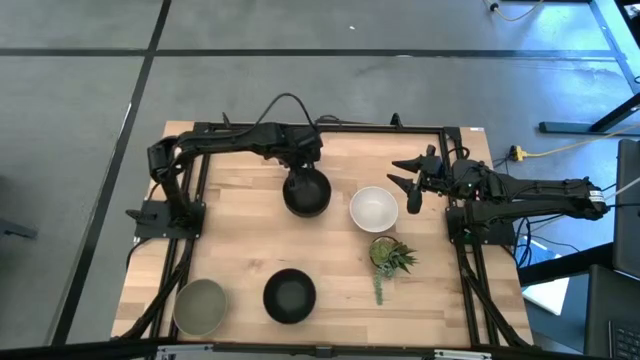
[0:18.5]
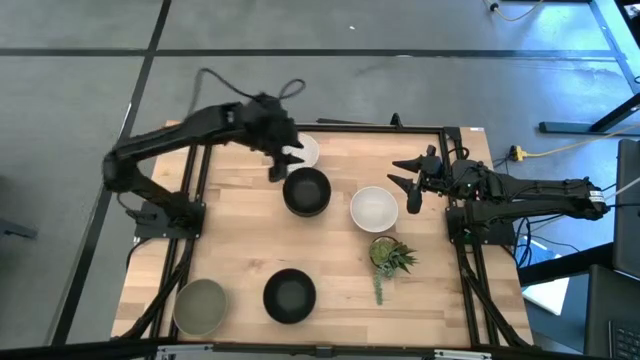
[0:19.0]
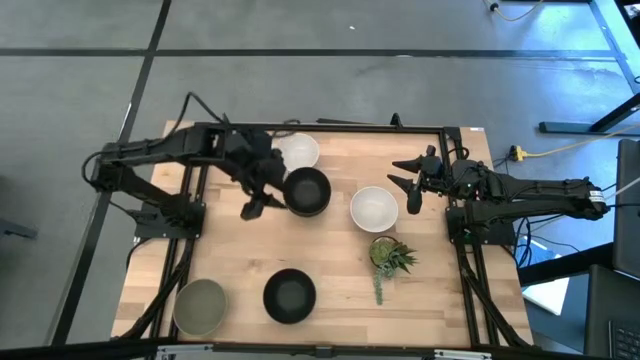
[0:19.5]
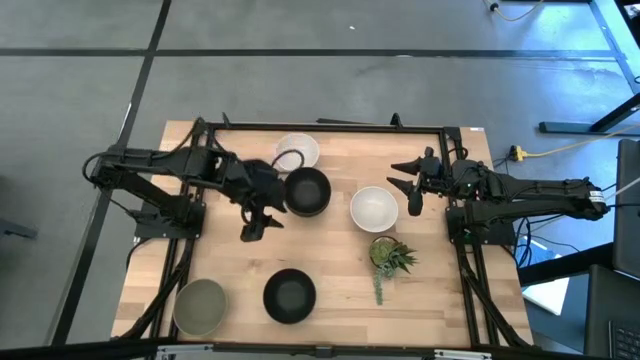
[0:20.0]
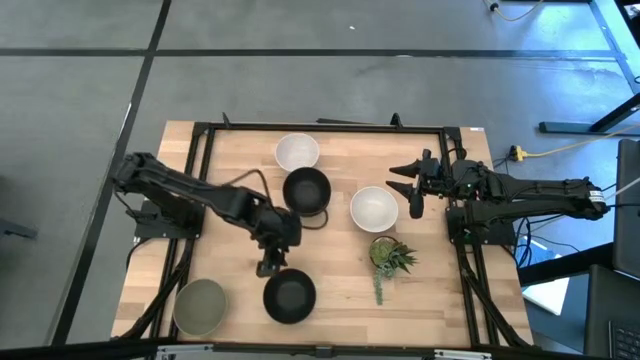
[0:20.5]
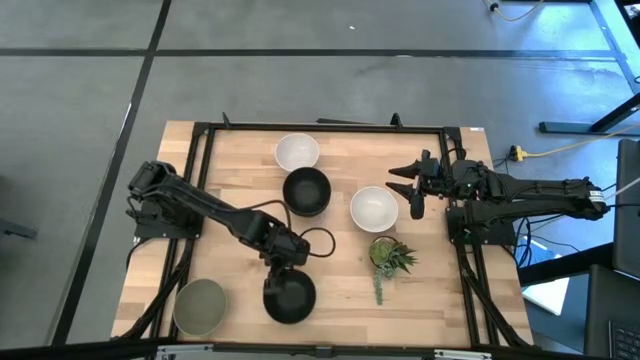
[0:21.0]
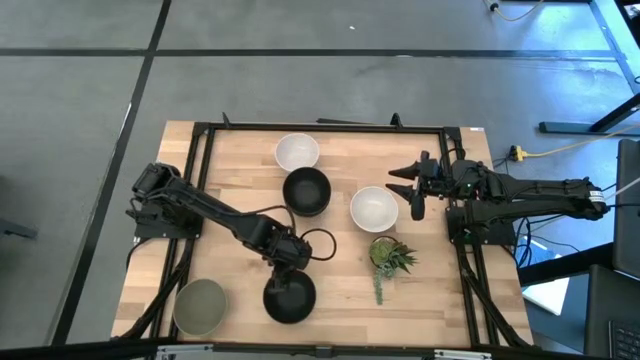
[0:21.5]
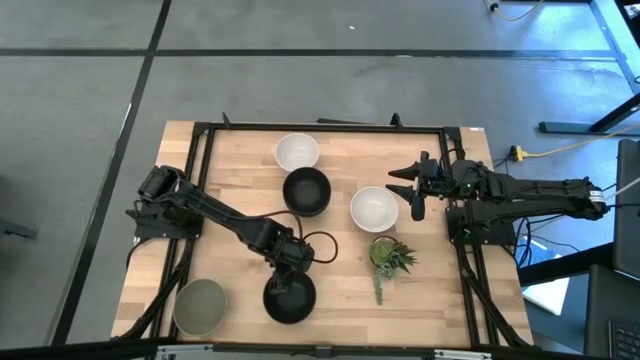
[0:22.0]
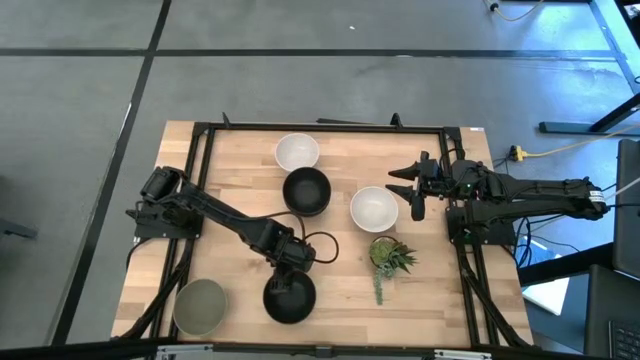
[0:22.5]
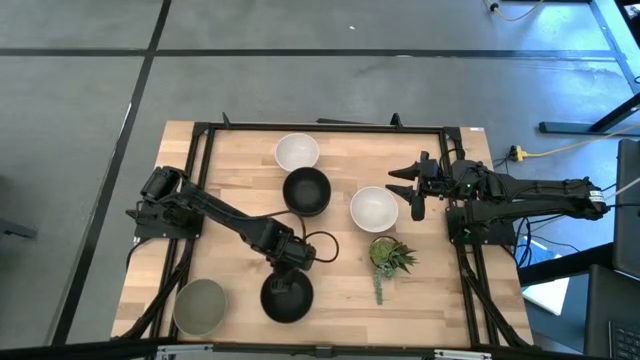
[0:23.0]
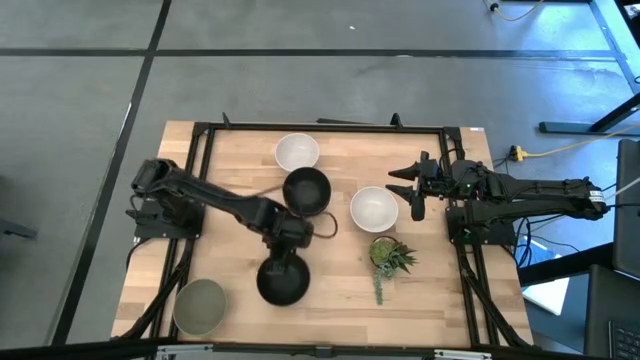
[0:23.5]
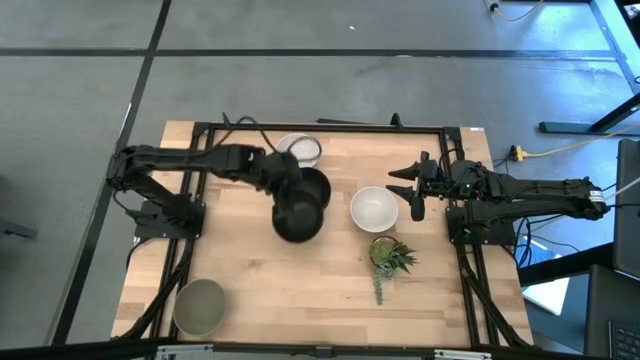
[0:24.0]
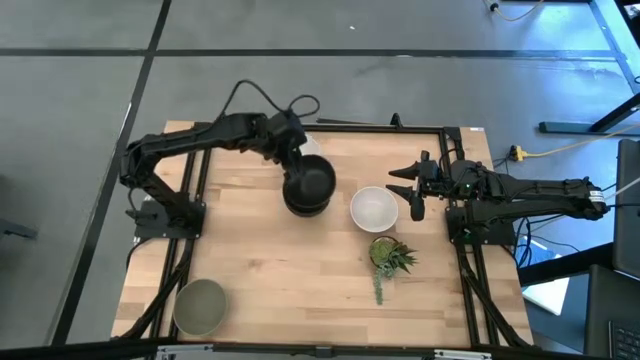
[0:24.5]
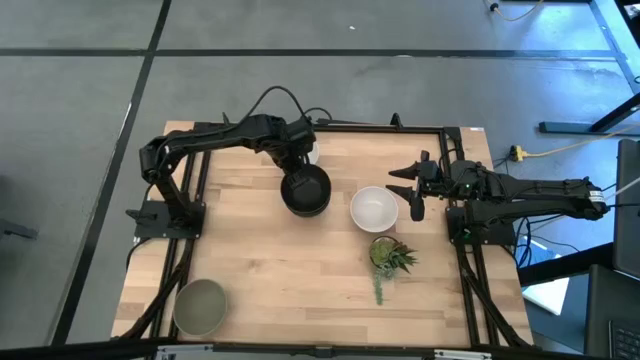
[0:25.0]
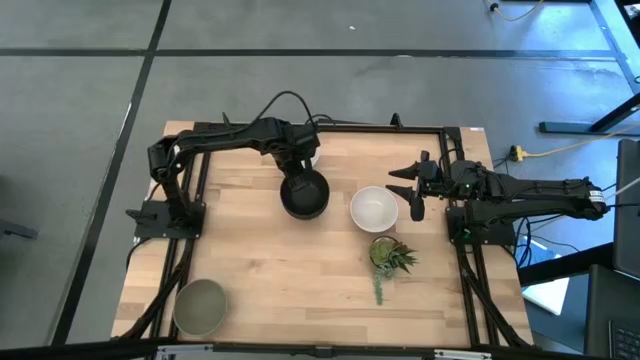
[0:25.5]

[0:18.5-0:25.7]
Task: Nest bowls inside each other
Stack the bottom black bowl on top of the other top black bowl

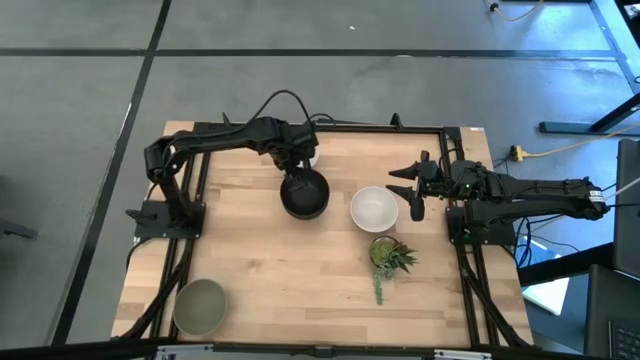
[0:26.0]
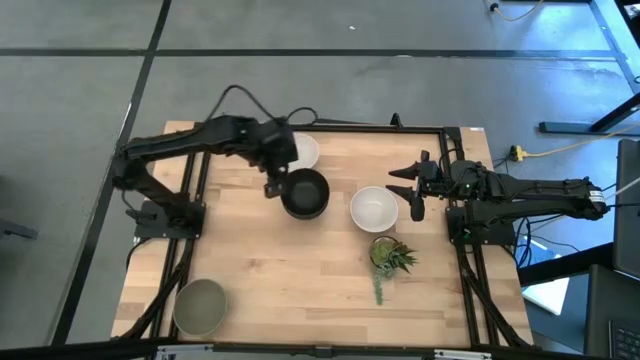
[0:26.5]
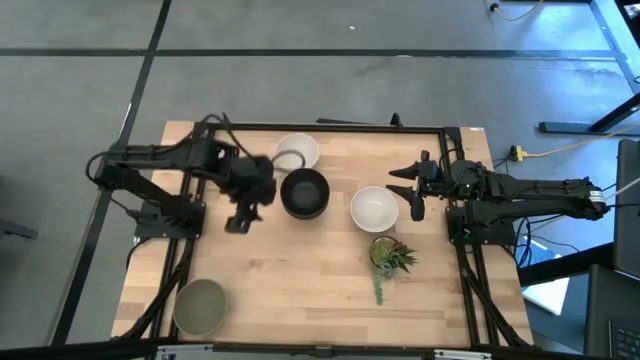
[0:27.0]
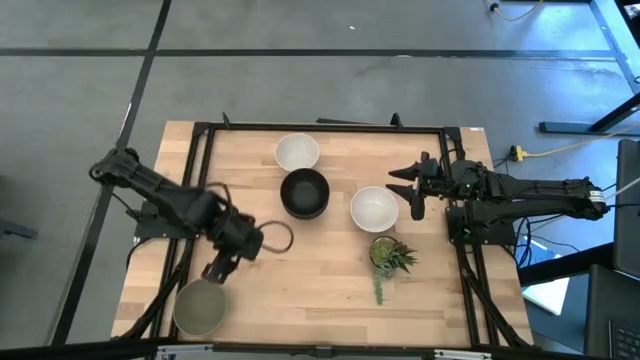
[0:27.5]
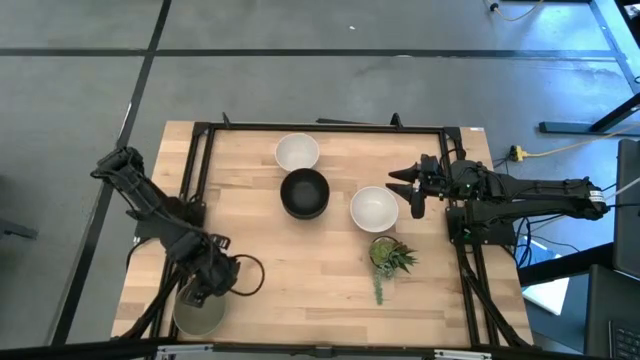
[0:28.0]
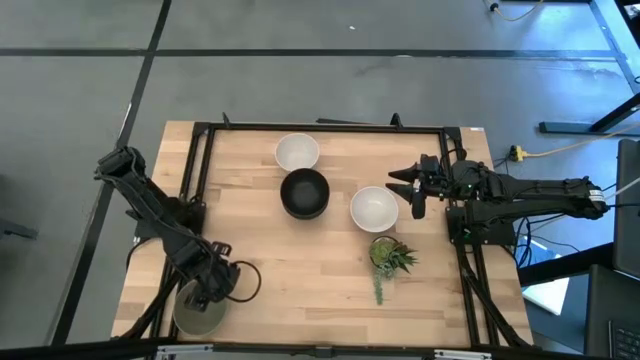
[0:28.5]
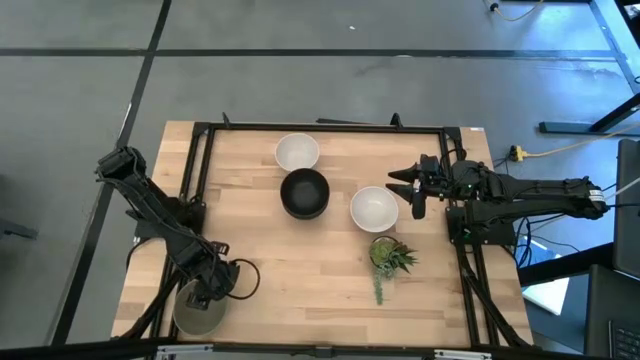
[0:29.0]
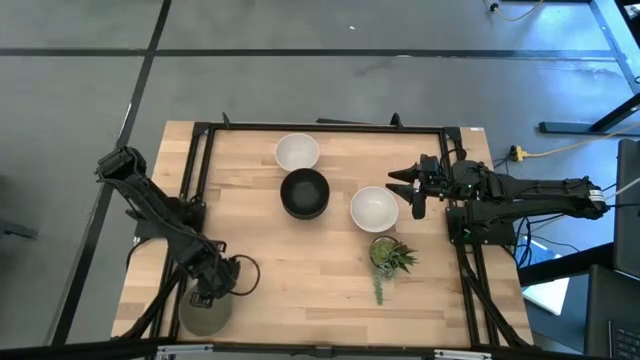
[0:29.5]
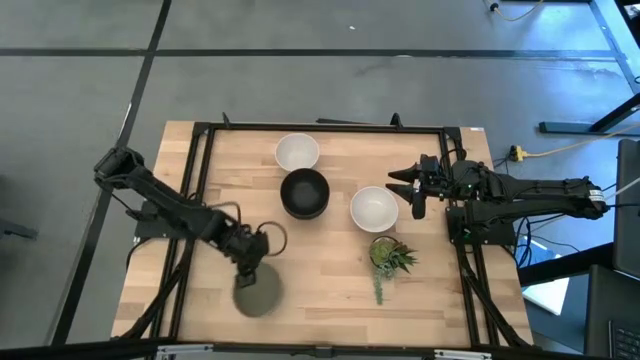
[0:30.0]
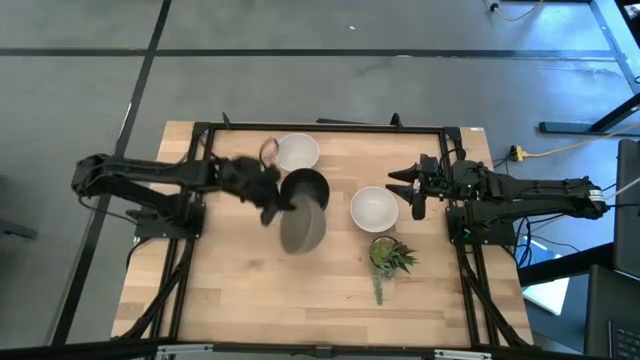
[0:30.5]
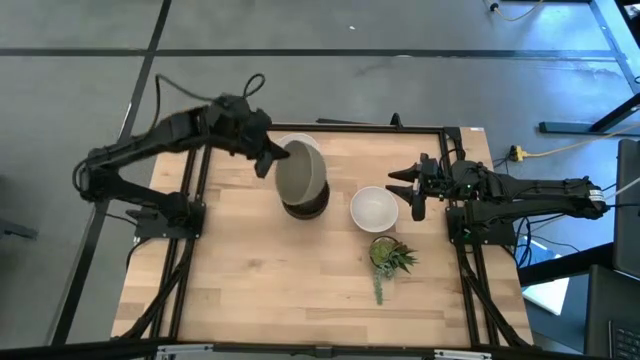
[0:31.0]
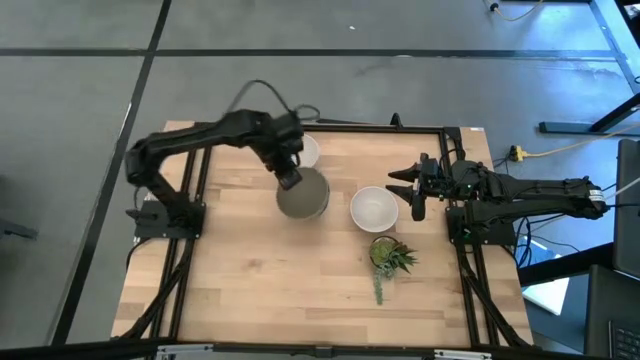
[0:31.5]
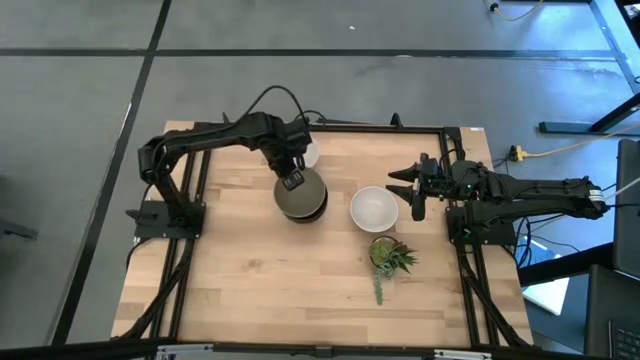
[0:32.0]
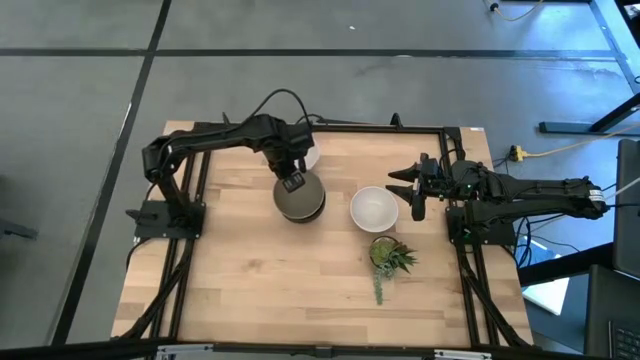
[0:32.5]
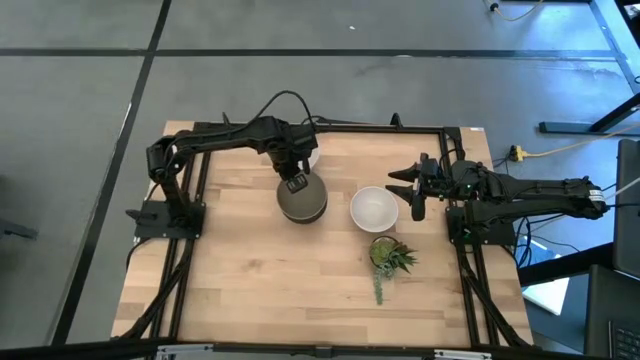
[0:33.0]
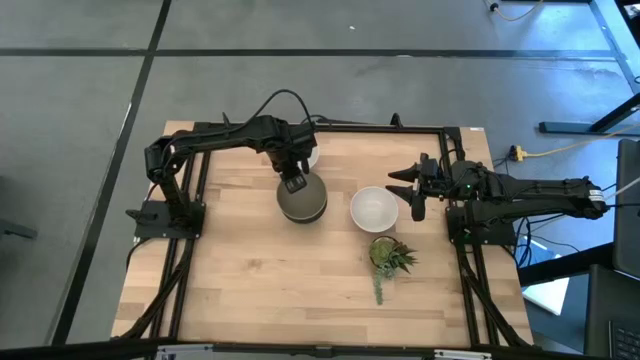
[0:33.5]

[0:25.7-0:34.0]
Stack the gray bowl on top of the black bowl

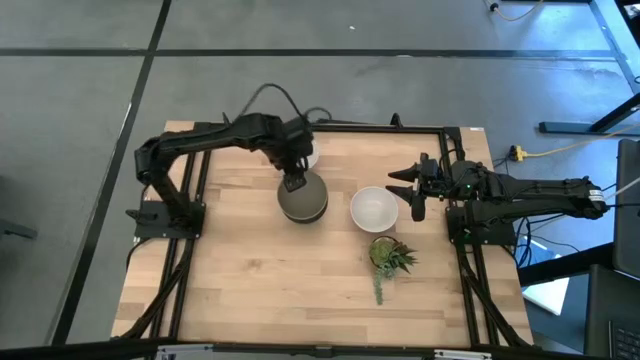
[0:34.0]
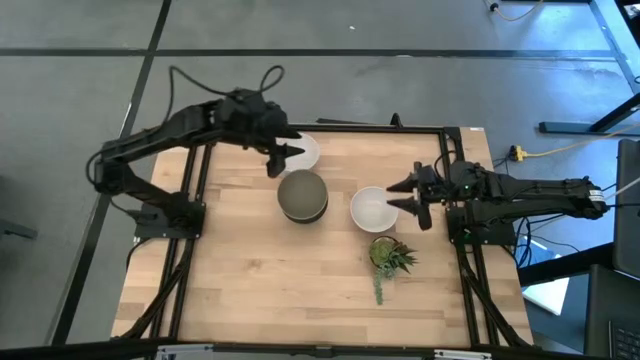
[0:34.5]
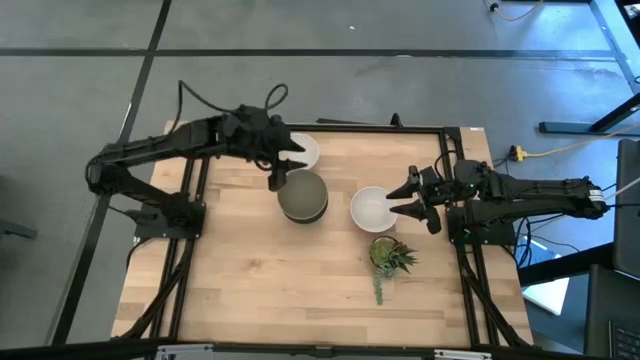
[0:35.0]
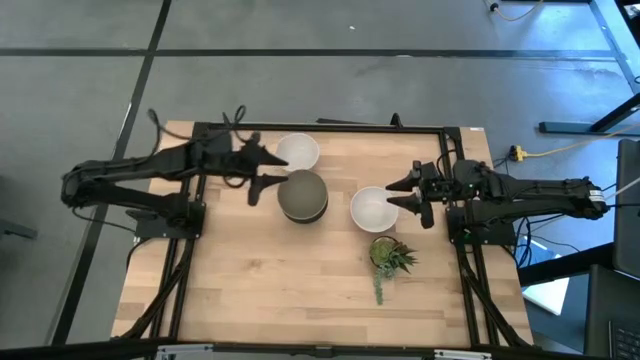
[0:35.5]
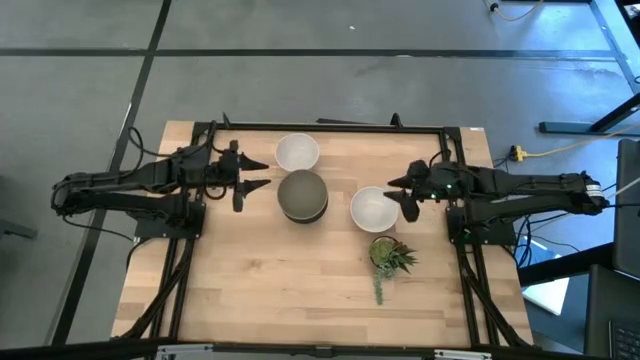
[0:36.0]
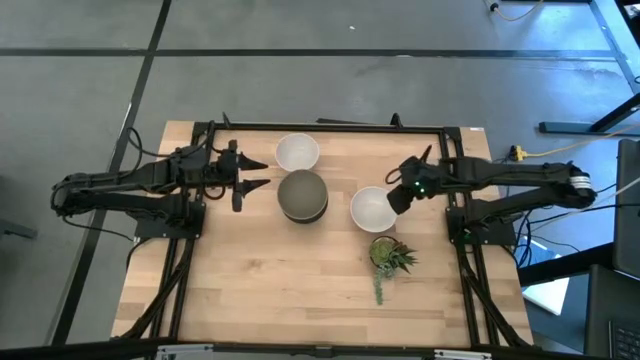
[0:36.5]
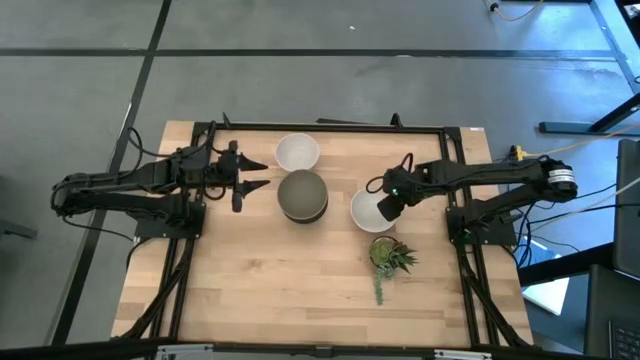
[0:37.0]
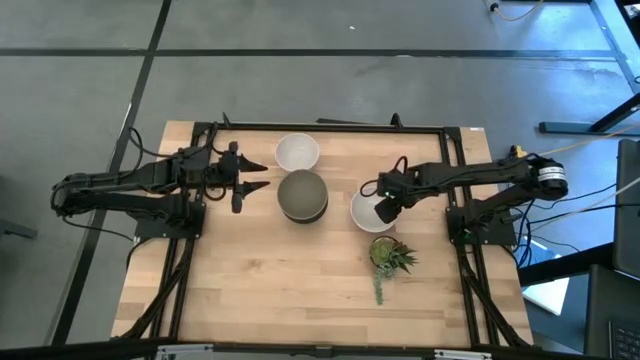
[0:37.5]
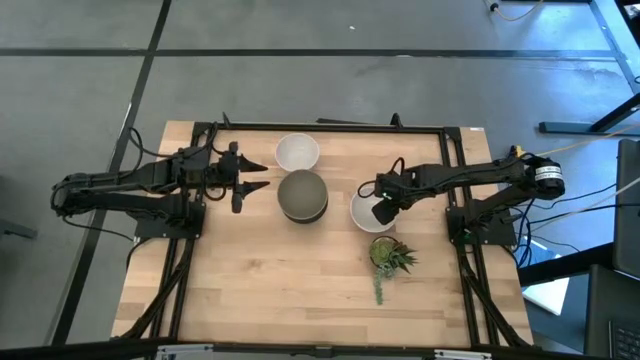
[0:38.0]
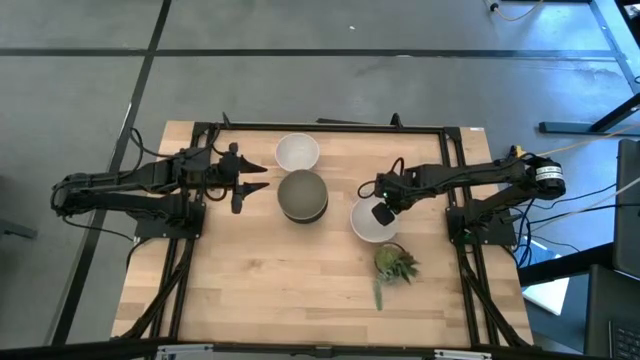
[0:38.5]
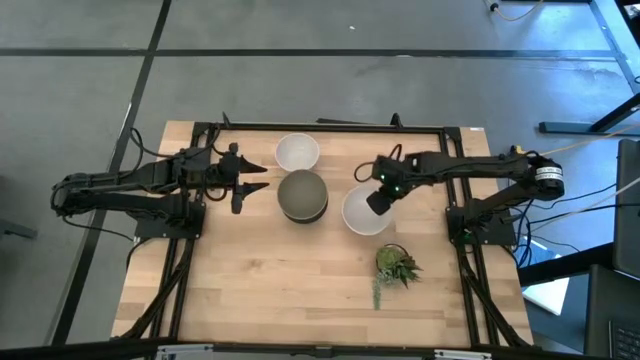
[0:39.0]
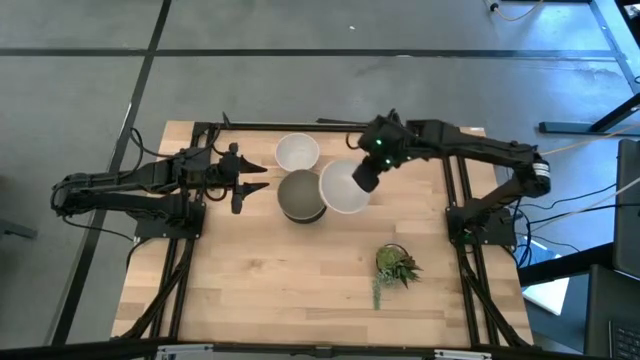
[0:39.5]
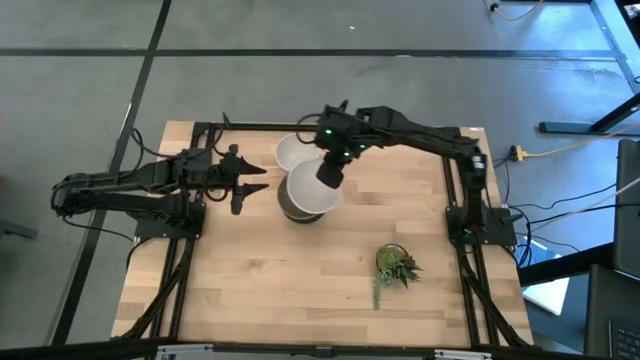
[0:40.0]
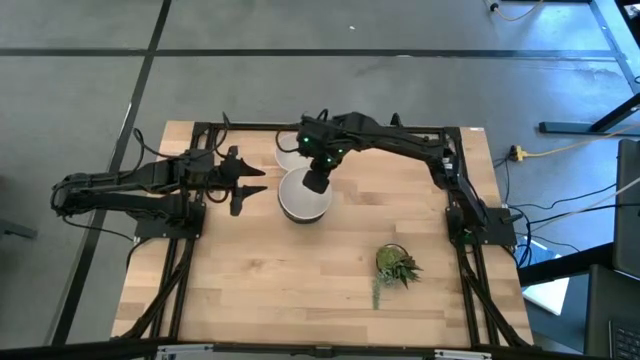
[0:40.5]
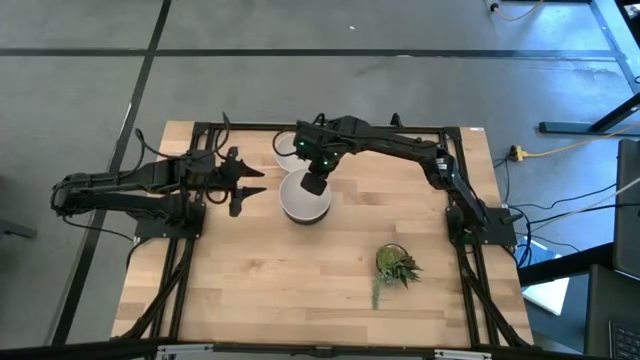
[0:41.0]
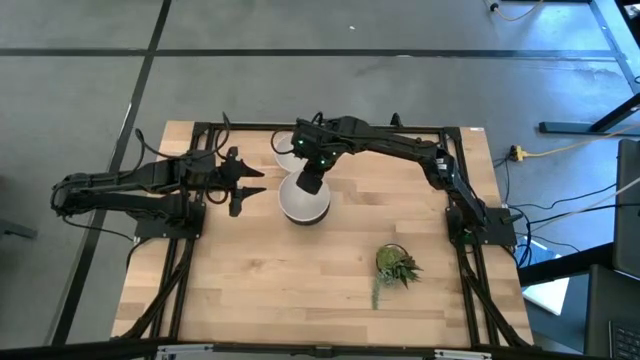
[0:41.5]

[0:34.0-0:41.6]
Stack the right white bowl on top of the gray bowl
